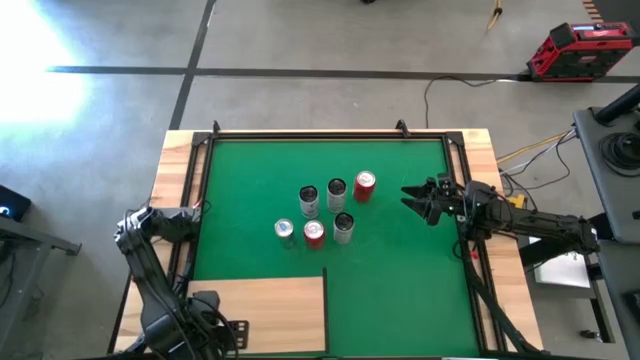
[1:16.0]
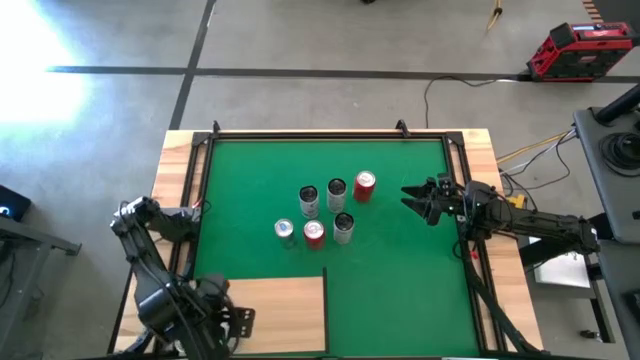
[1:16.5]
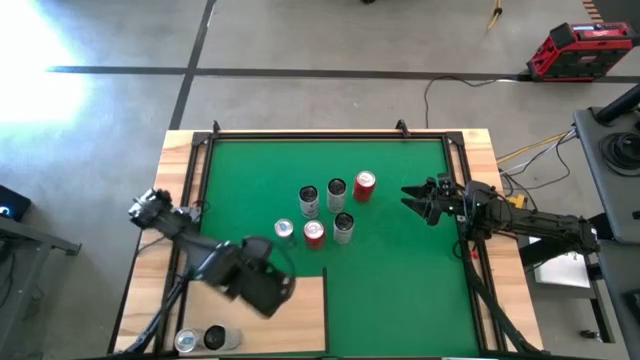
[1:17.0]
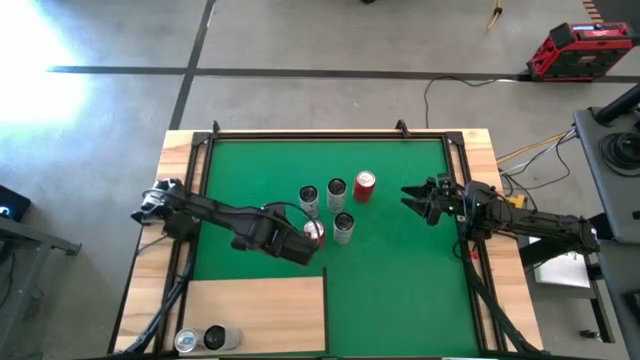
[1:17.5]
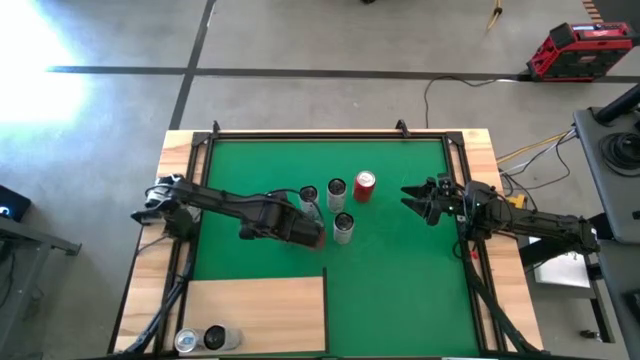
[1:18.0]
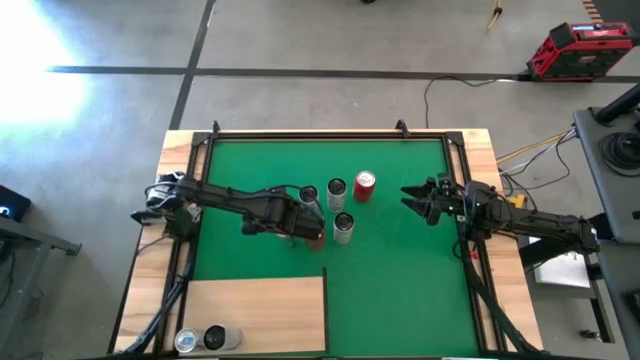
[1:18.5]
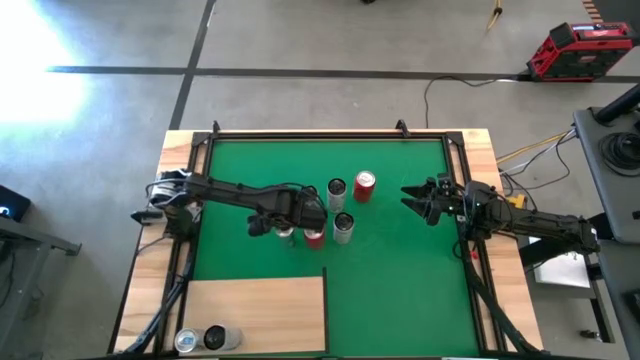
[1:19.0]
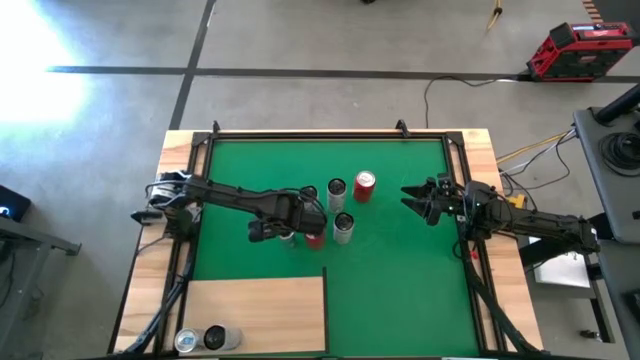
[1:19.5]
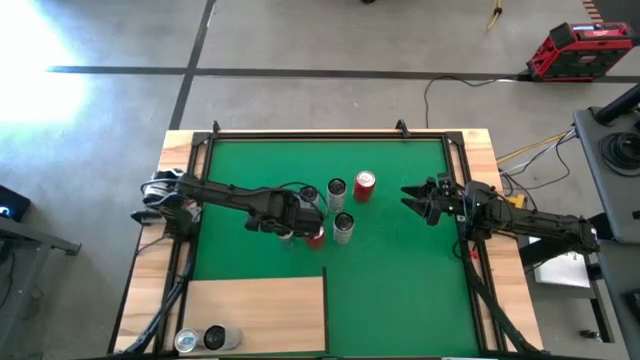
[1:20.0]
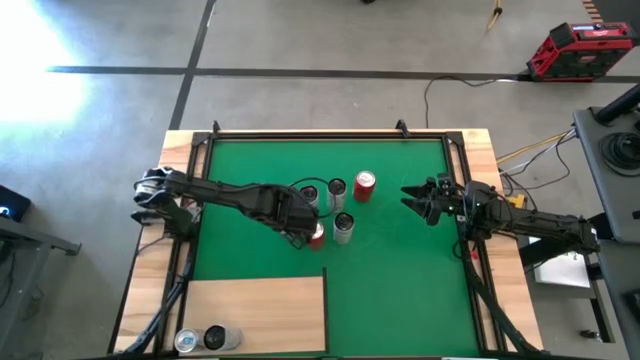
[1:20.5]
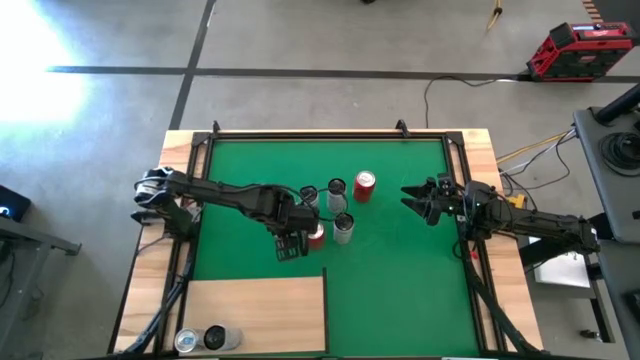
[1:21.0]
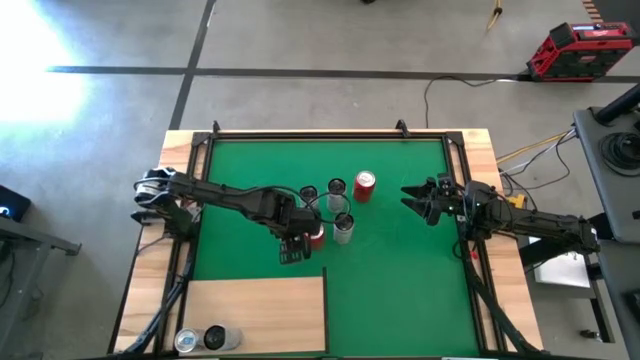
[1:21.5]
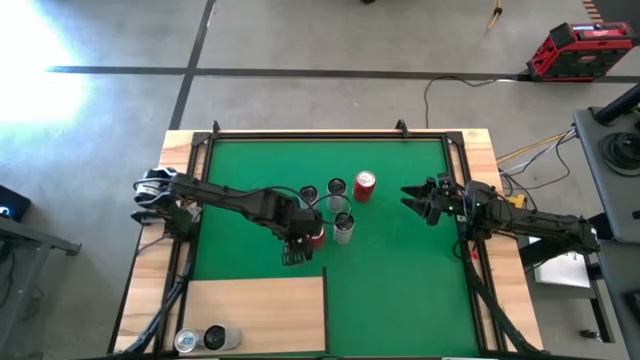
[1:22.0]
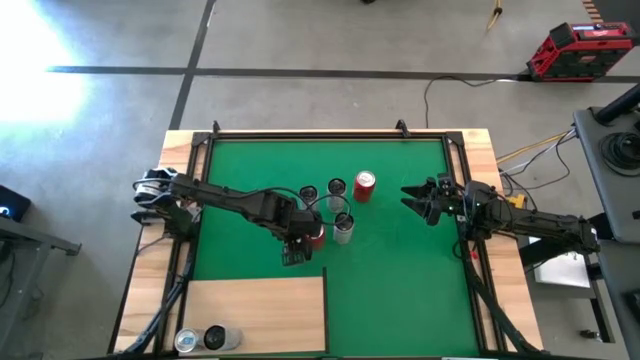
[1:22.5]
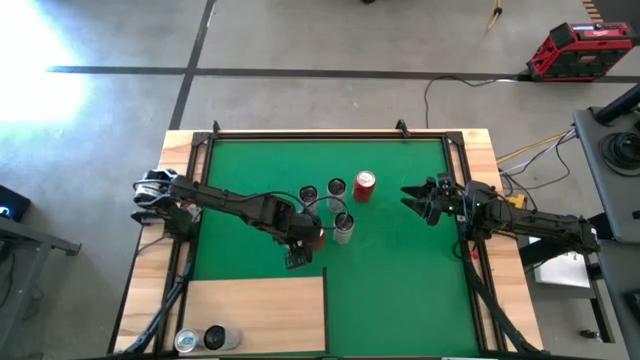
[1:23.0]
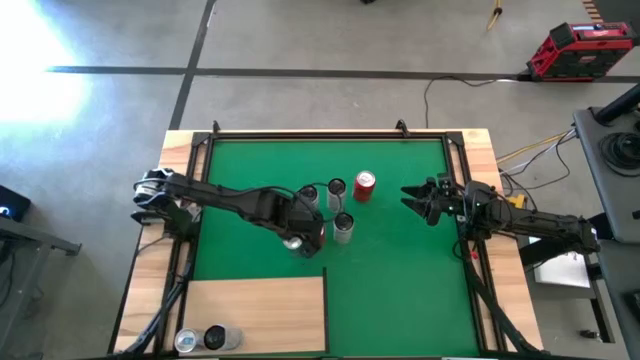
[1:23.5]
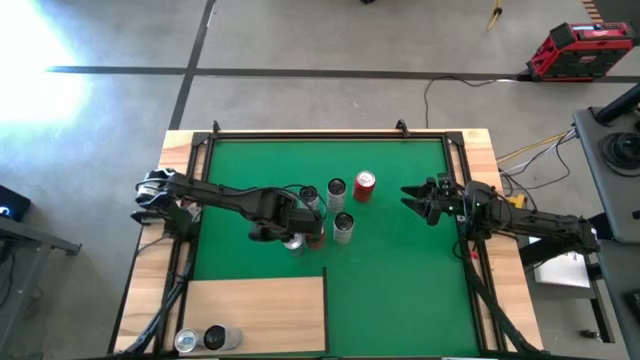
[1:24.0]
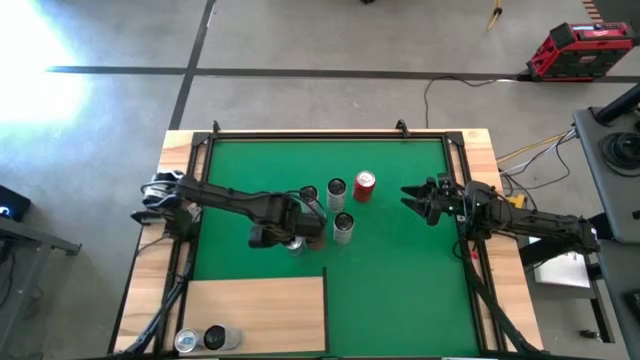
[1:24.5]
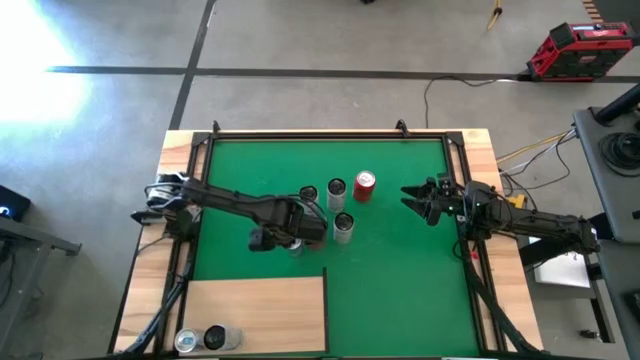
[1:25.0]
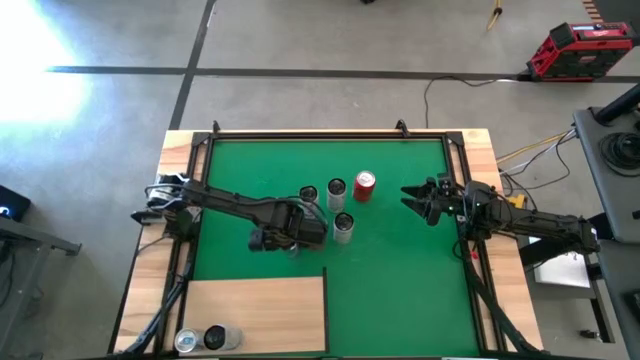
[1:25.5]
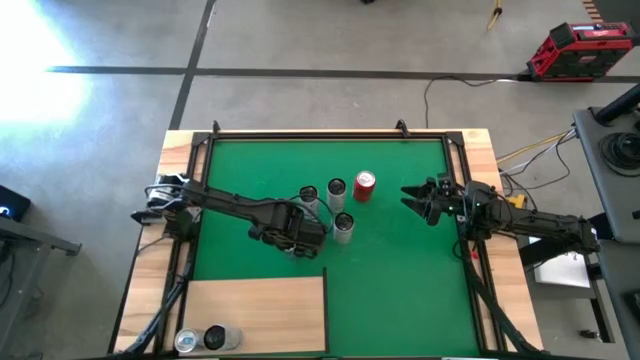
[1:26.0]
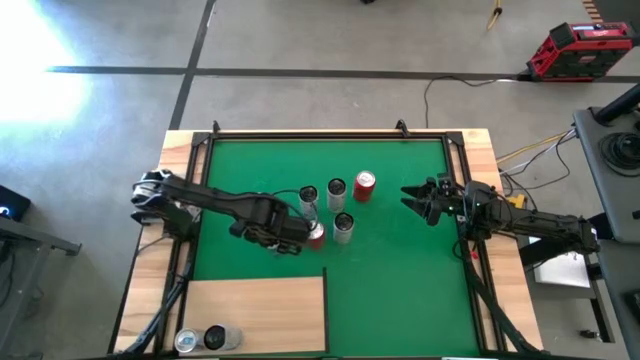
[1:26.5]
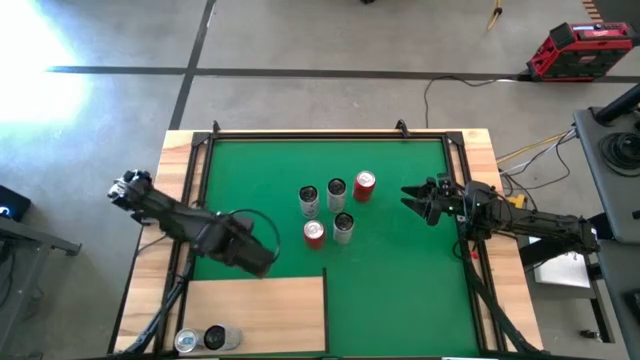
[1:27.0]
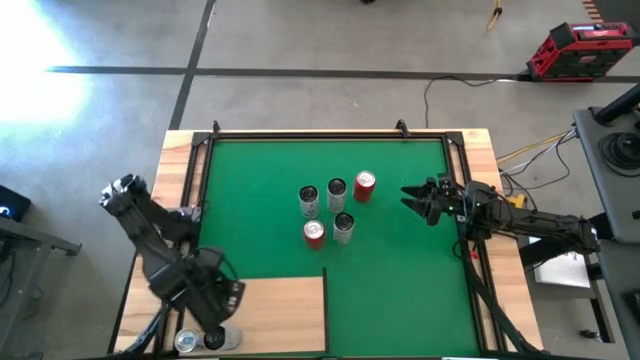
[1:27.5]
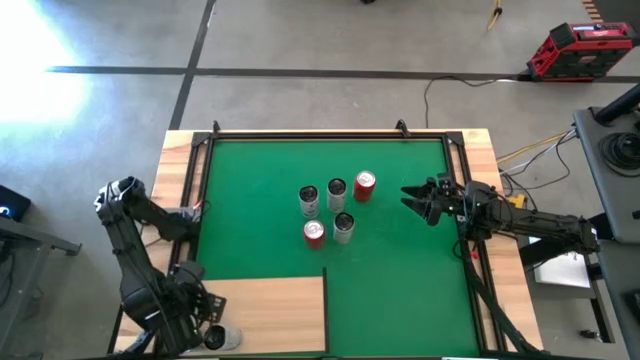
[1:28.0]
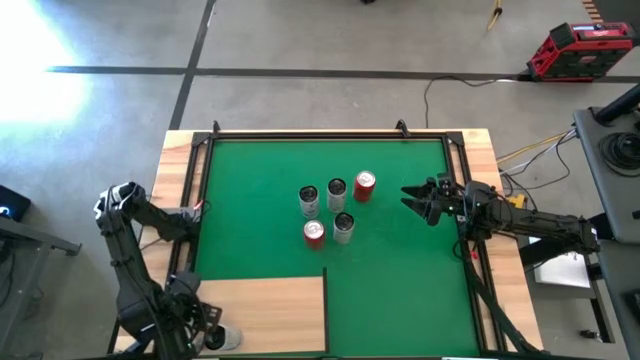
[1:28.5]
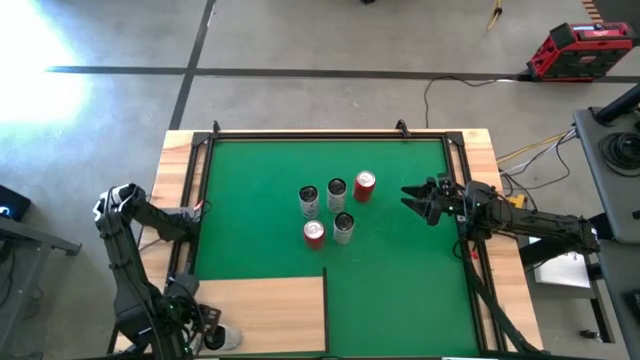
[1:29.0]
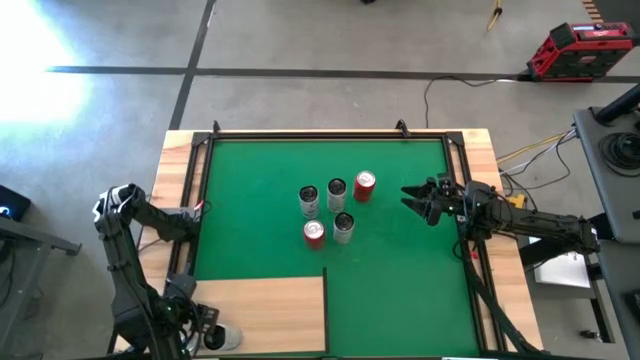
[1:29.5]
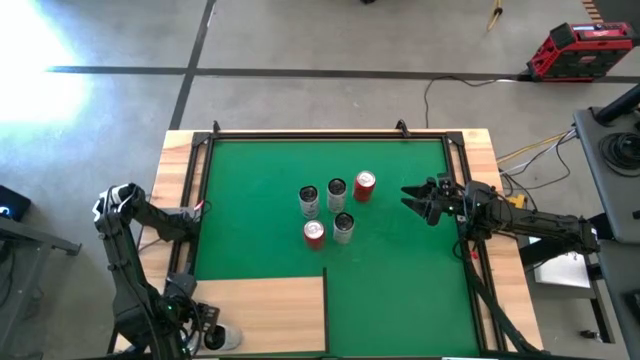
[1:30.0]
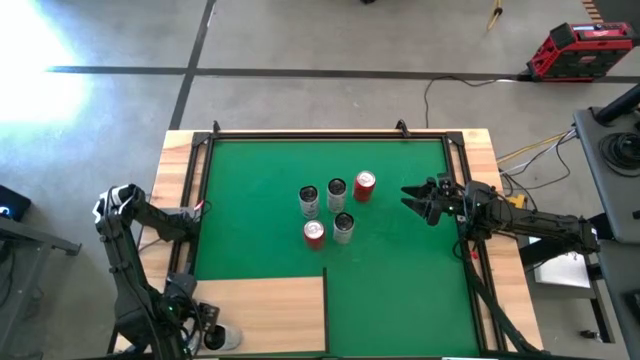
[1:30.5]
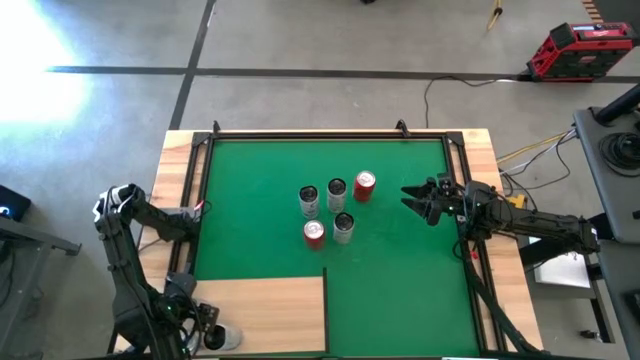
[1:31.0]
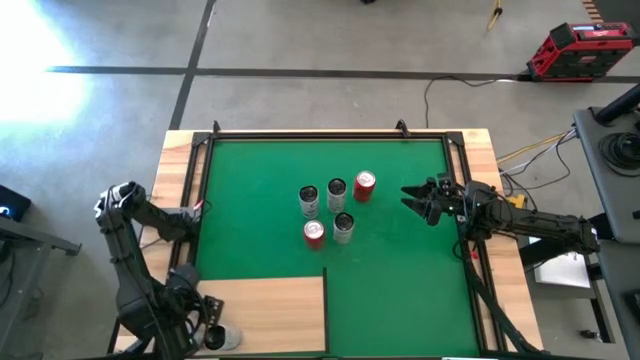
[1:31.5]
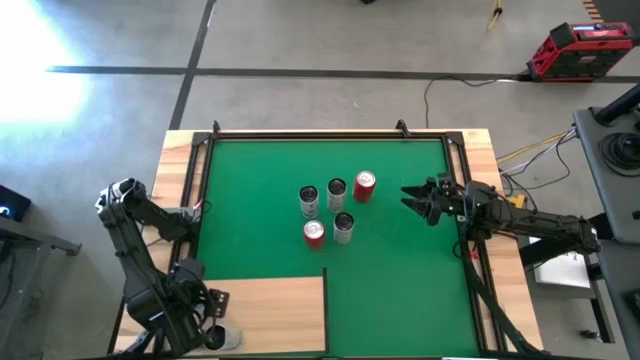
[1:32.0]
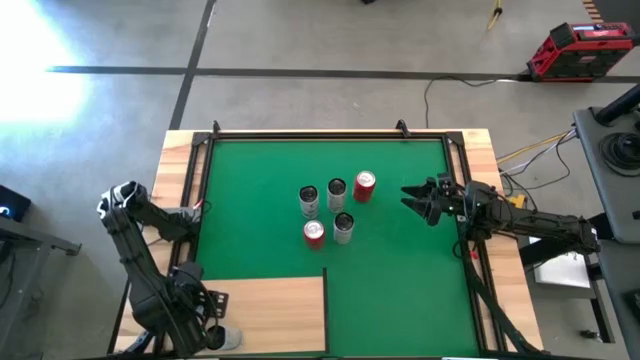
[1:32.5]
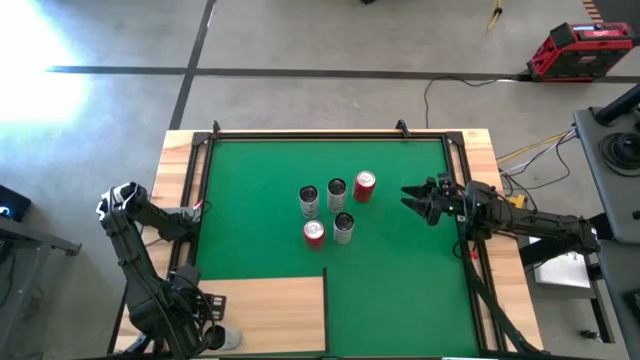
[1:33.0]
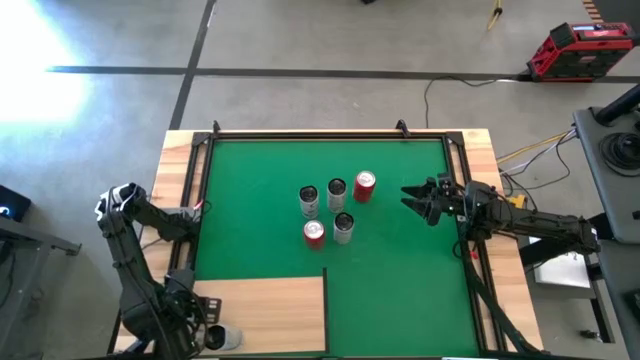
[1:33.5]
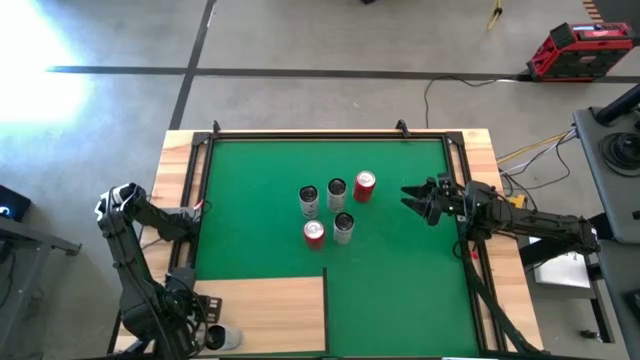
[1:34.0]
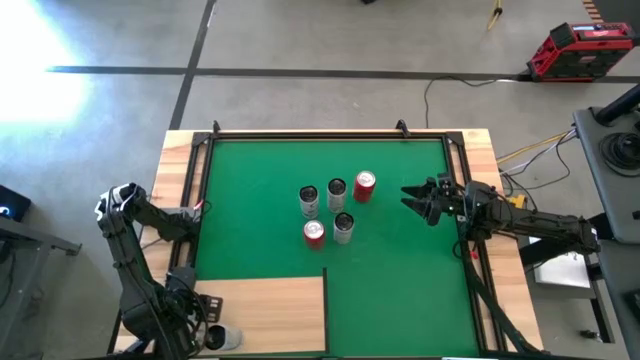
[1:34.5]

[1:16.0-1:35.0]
Task: Place canned beverage on shelf
Put the blue soda can on the shelf aligned with the other blue soda can
